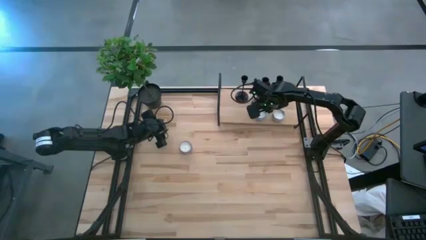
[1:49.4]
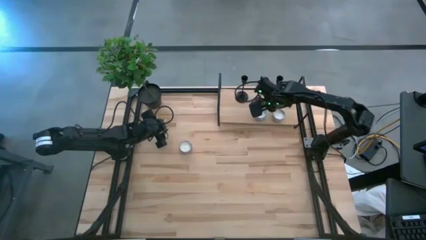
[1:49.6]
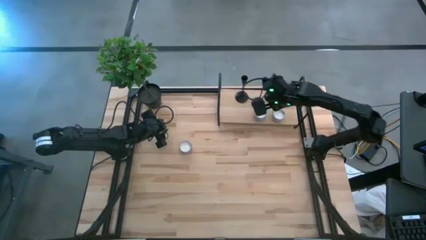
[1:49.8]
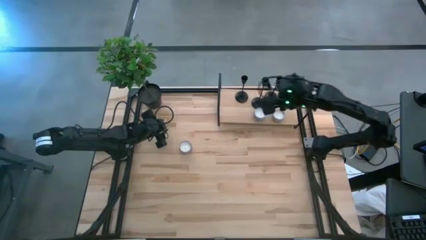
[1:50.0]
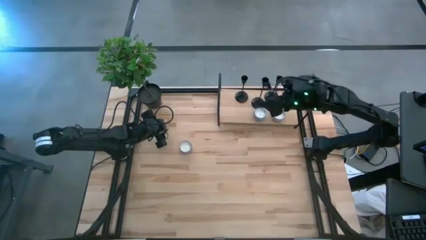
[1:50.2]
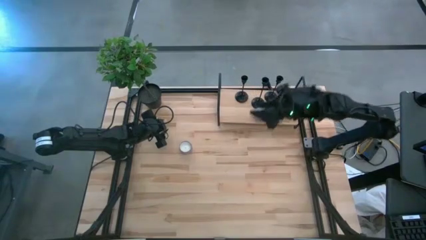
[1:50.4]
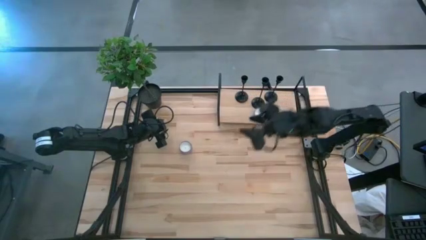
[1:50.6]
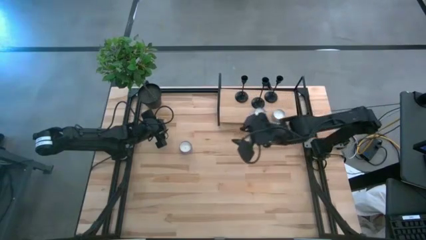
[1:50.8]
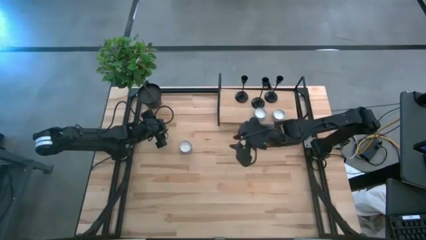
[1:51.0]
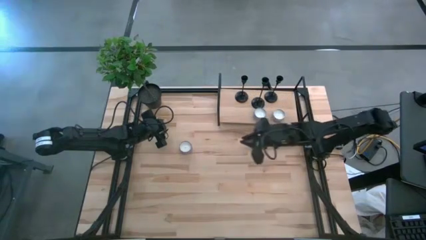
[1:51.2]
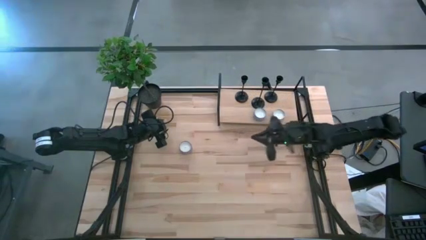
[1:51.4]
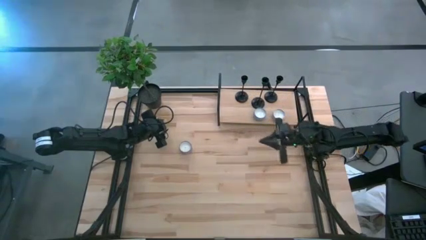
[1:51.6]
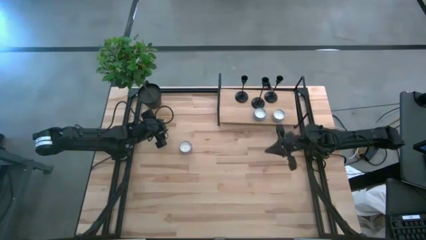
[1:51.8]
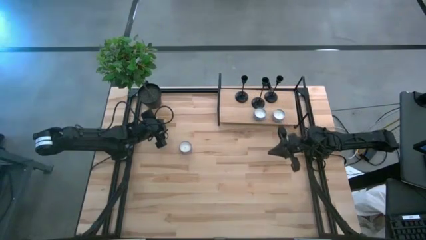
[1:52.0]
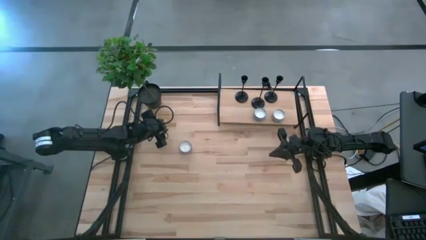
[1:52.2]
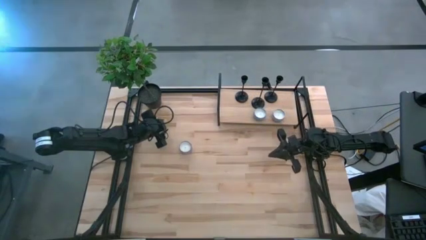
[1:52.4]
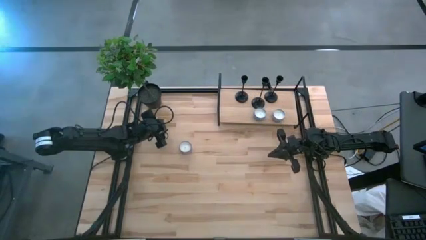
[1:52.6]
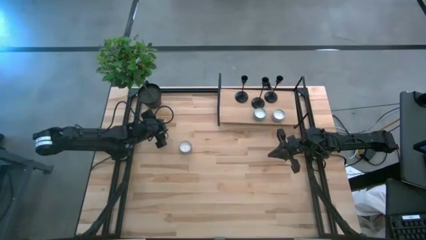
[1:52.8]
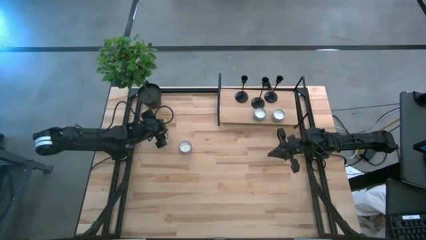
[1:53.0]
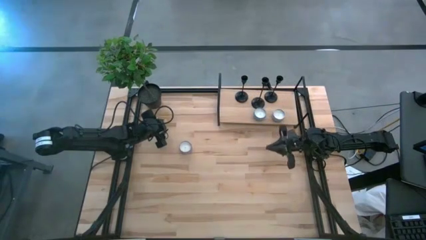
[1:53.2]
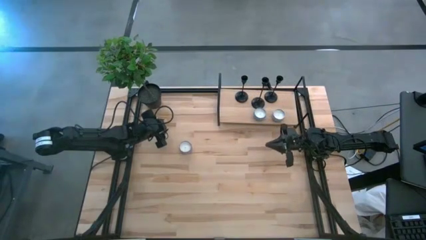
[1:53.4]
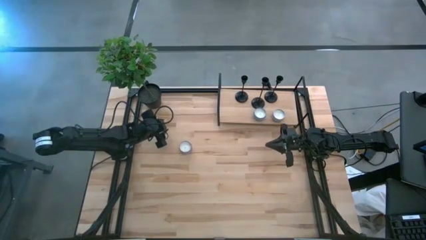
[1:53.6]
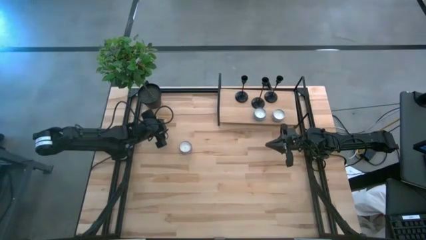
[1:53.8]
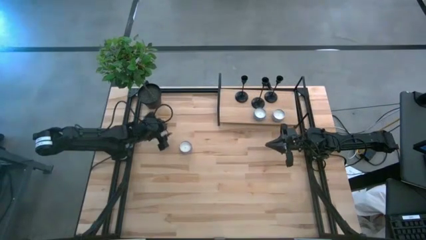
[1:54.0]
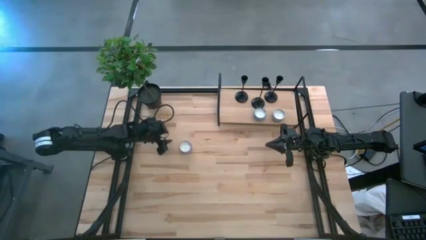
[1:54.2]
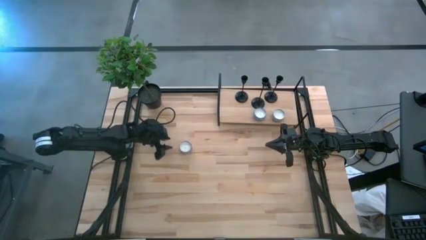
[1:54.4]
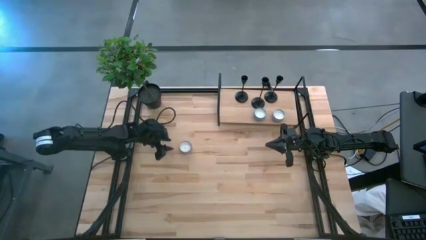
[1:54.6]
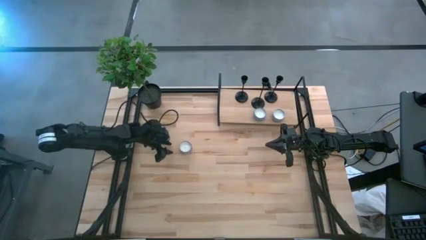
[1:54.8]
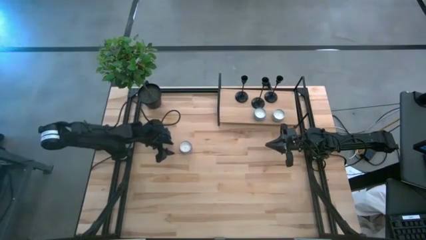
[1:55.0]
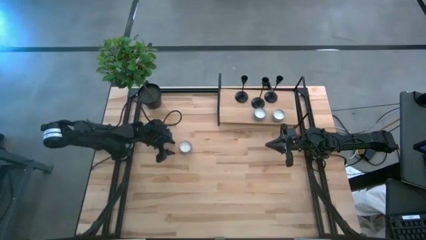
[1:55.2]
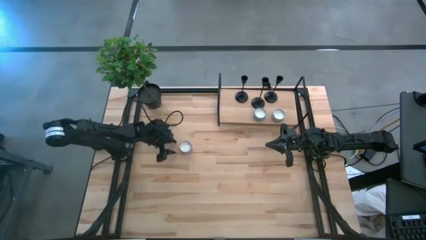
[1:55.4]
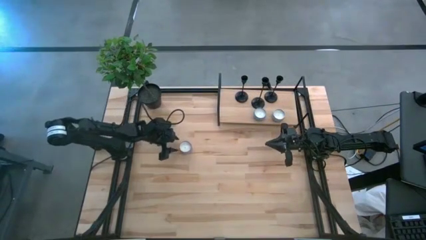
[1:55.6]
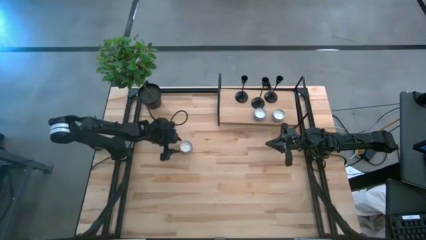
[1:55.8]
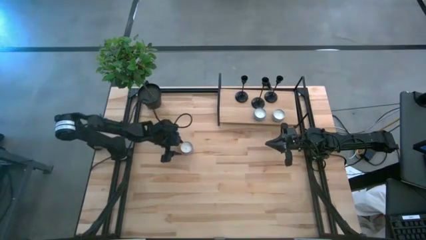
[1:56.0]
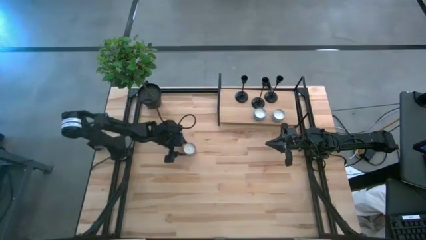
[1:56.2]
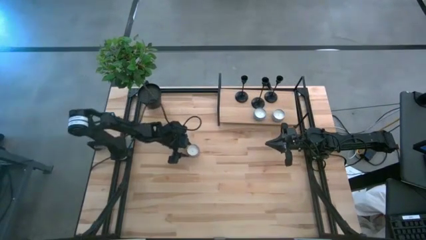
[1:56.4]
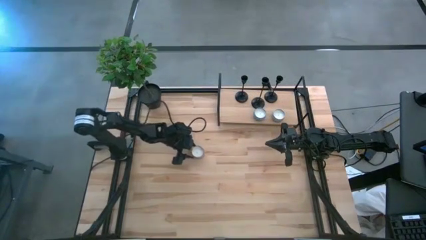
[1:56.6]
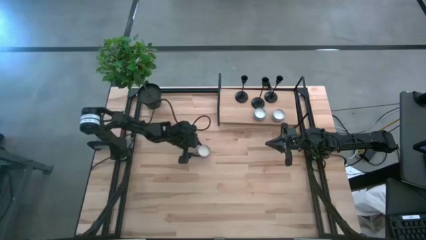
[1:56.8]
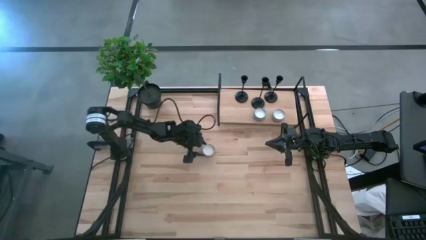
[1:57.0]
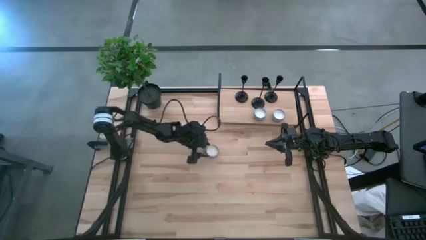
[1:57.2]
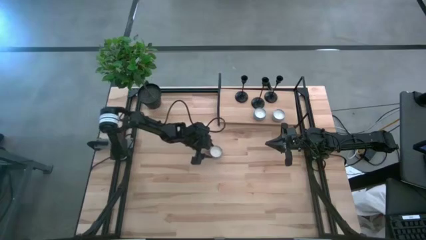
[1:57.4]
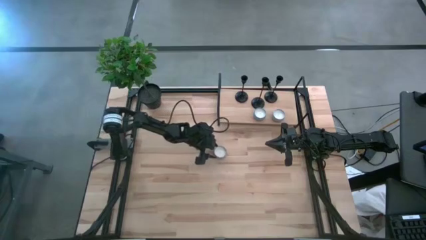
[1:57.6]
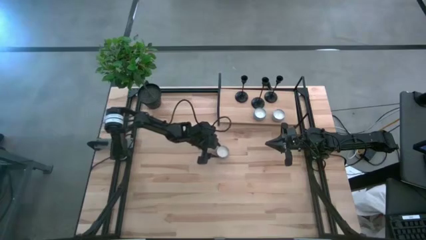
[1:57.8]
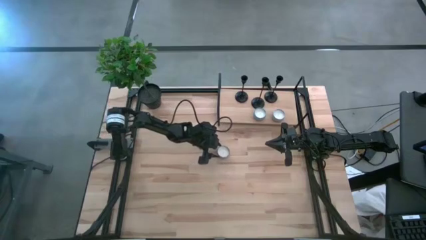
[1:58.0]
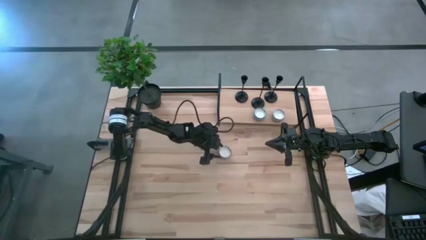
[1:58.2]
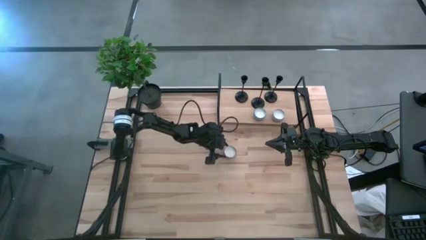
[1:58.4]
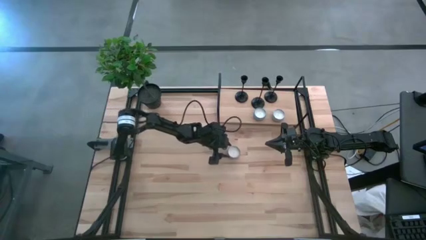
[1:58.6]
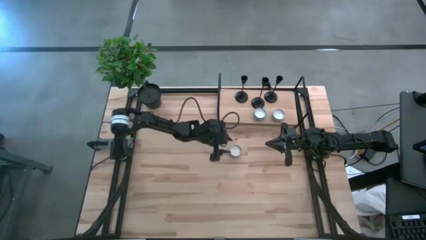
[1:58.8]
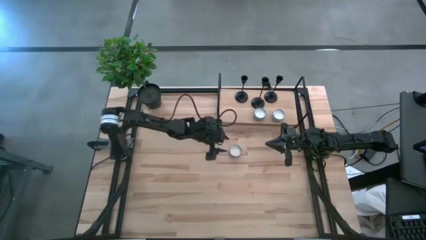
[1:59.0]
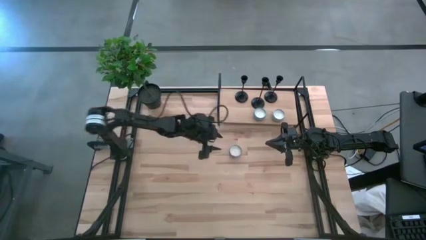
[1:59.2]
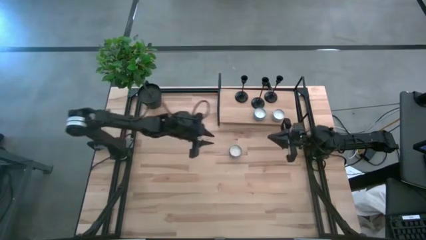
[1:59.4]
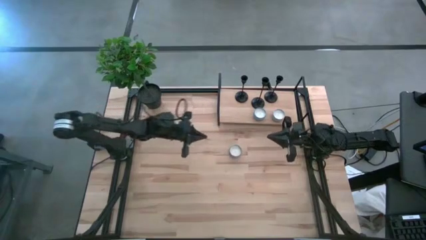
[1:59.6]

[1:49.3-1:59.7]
Task: Pick & Place candle stick holders
Put the pink scented candle on the shelf

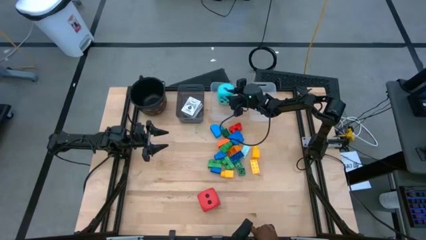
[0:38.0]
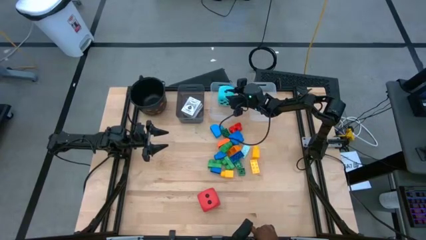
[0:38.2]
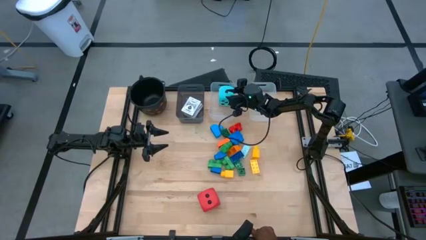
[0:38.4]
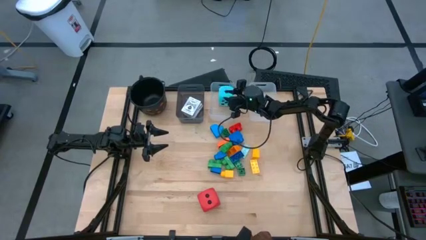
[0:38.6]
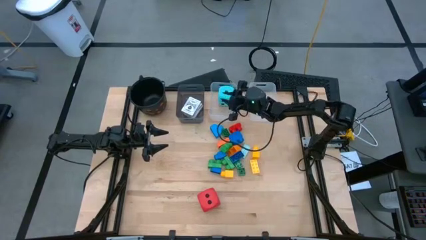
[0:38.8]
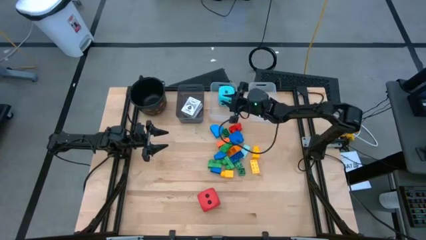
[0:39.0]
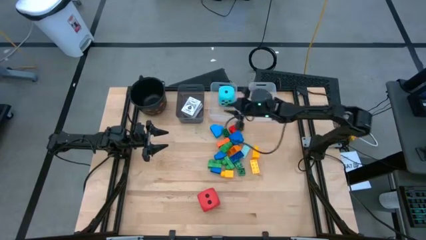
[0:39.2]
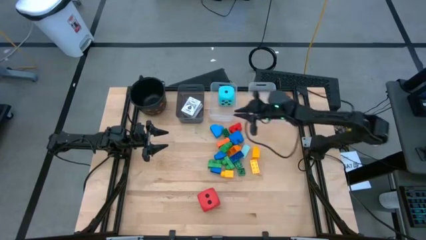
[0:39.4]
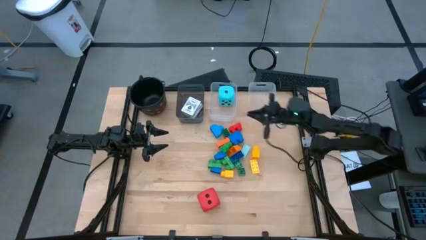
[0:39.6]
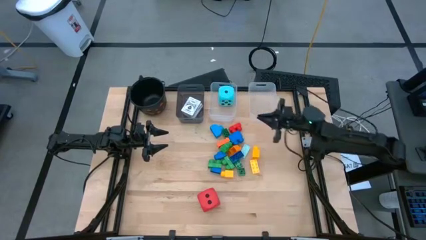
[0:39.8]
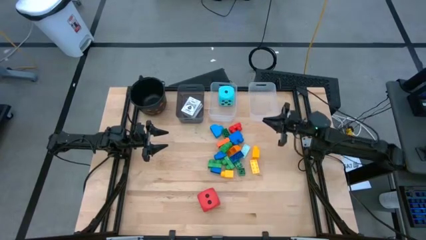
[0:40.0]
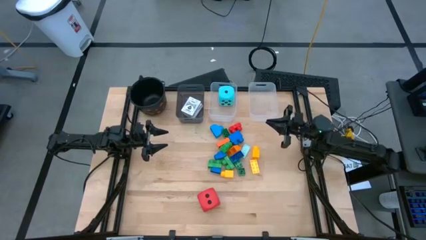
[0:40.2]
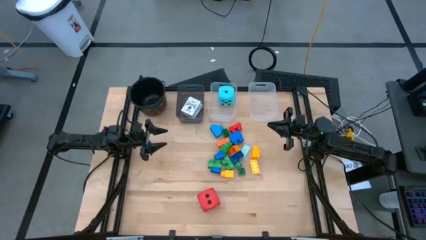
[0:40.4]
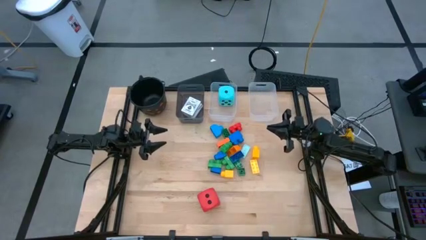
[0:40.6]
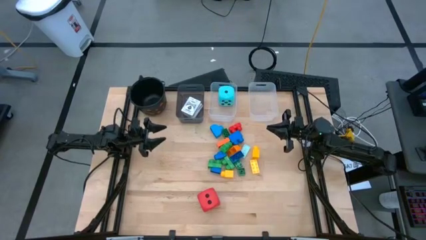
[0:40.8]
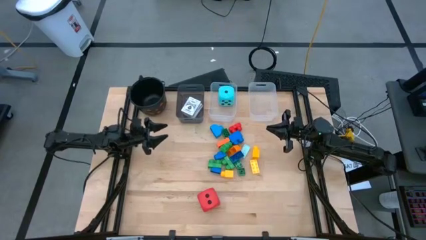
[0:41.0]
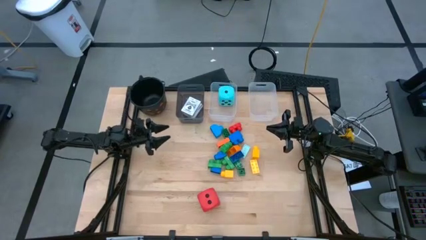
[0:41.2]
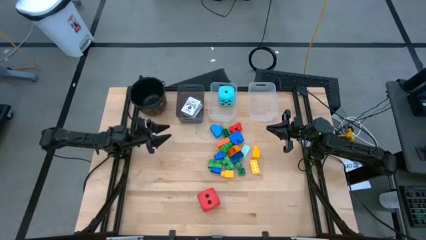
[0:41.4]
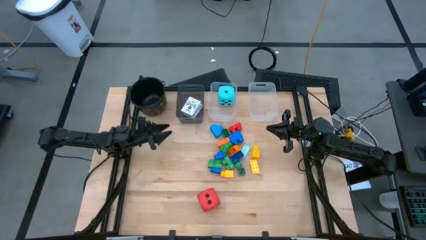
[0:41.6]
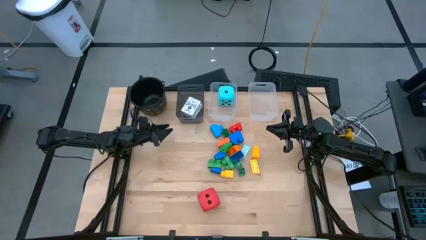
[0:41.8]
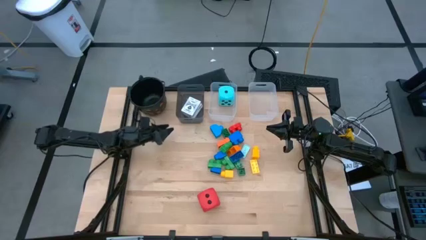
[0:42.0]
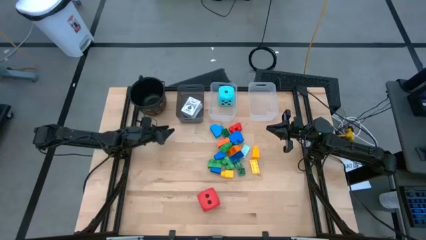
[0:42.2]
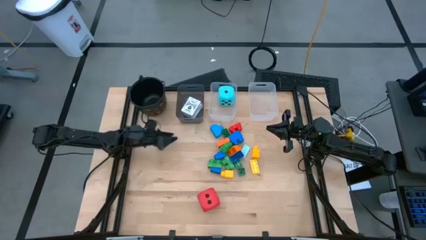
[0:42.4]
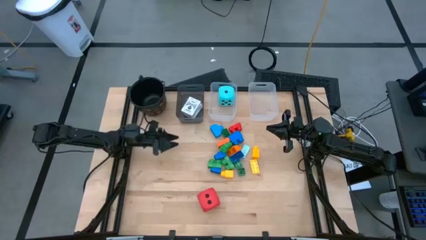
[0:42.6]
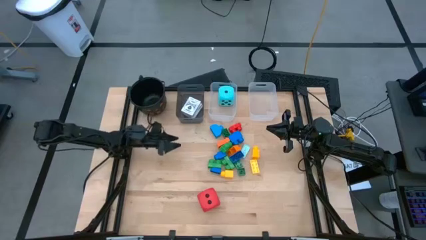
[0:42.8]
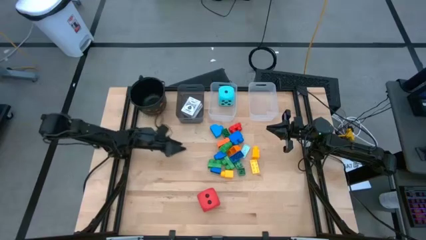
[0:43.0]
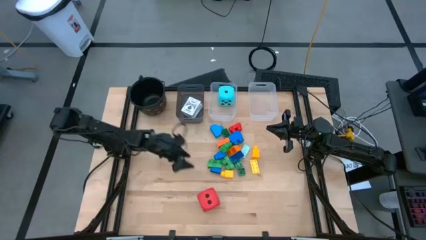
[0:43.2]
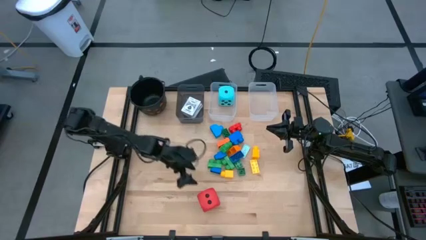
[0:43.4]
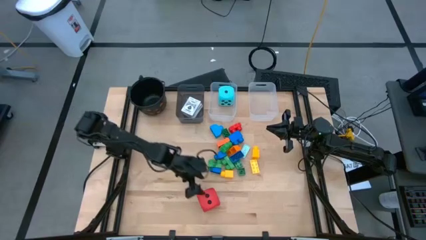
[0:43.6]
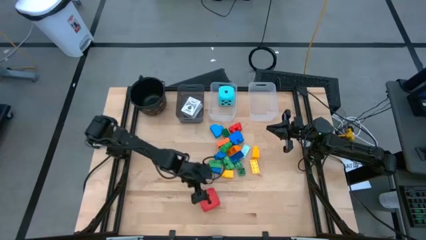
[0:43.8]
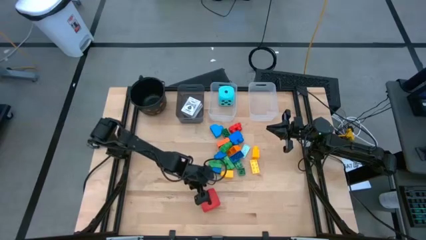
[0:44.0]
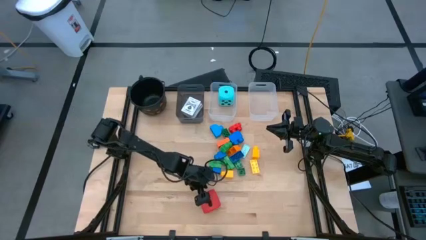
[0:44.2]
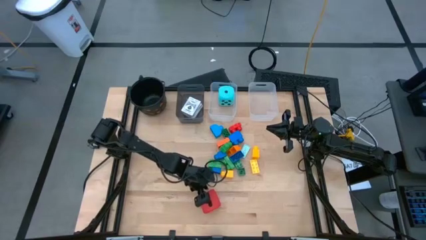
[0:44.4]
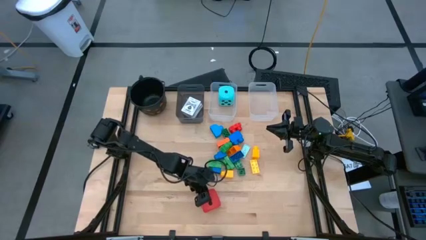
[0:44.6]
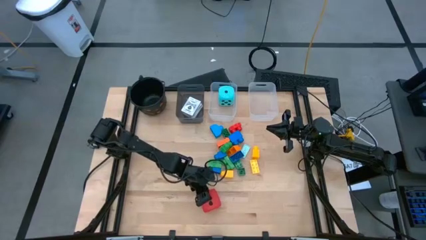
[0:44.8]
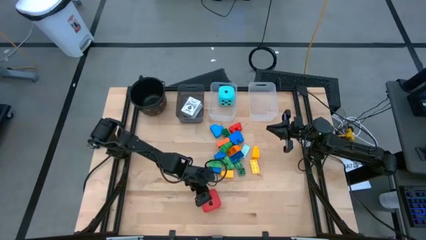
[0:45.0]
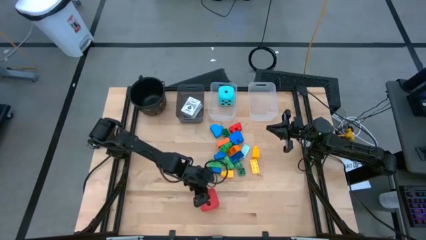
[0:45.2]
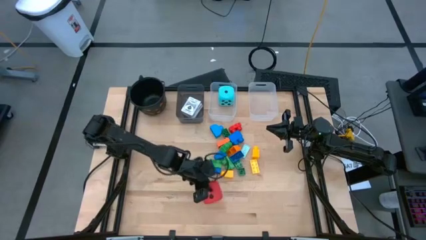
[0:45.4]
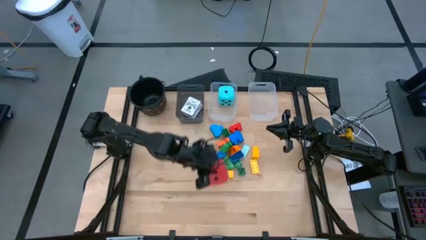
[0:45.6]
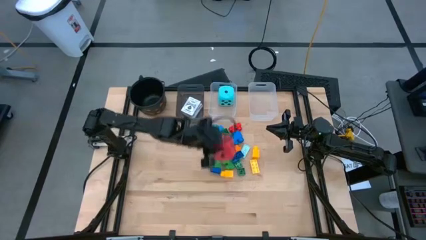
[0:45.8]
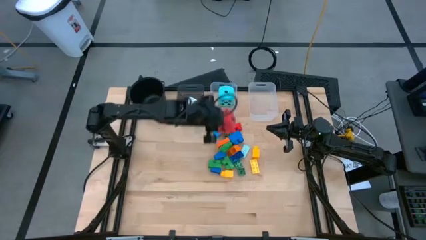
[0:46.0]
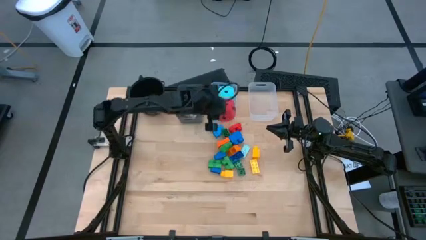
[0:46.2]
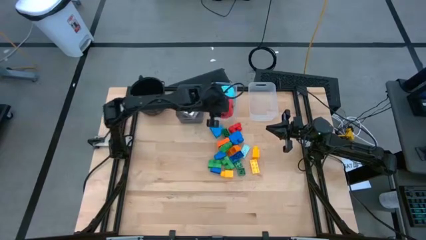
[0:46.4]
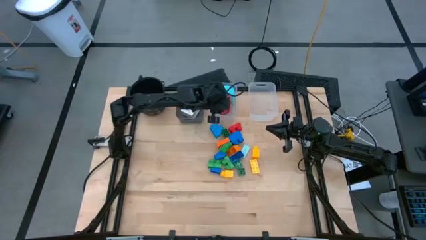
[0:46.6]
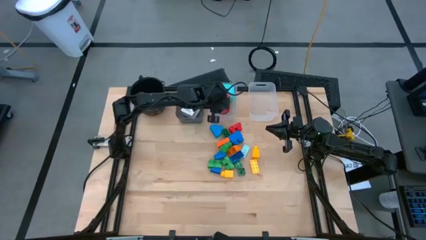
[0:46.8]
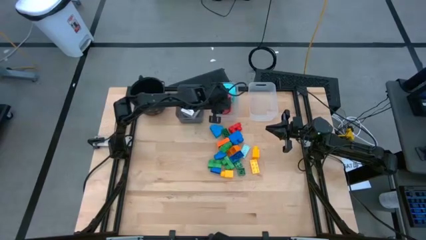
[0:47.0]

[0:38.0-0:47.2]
Task: Pick & Place Toys
Put the red dice into the left transparent bin
